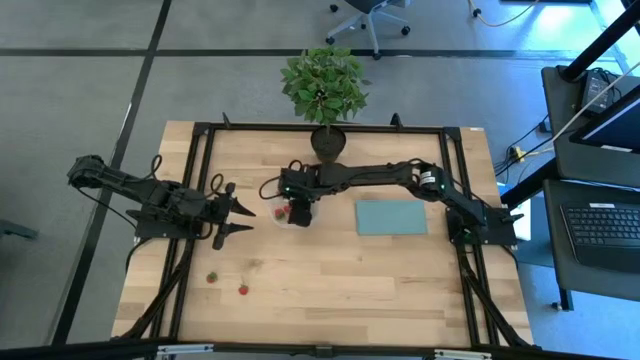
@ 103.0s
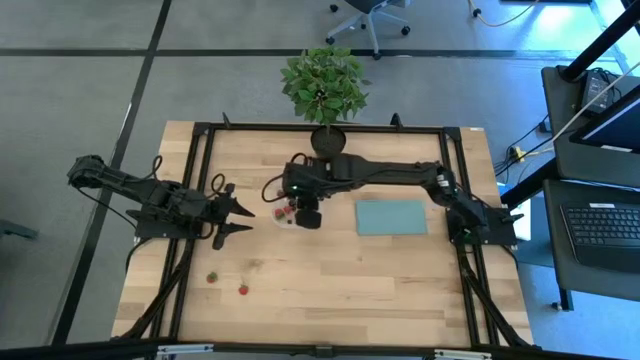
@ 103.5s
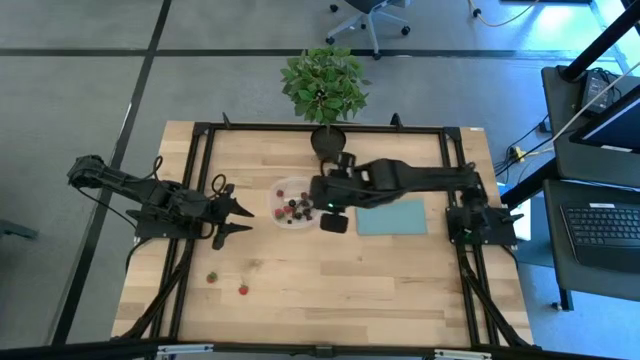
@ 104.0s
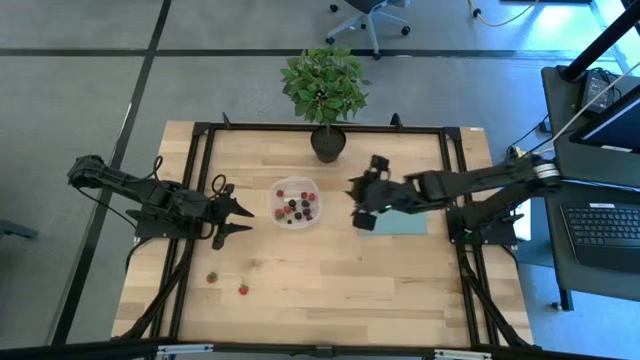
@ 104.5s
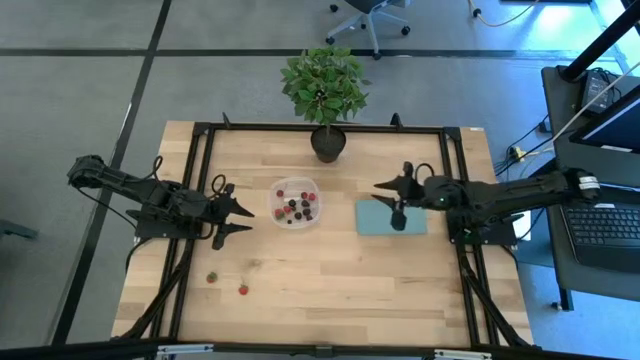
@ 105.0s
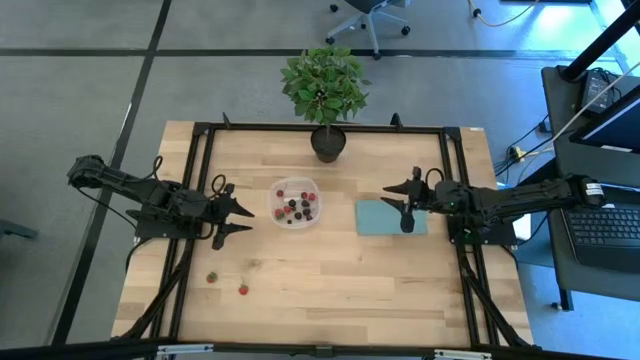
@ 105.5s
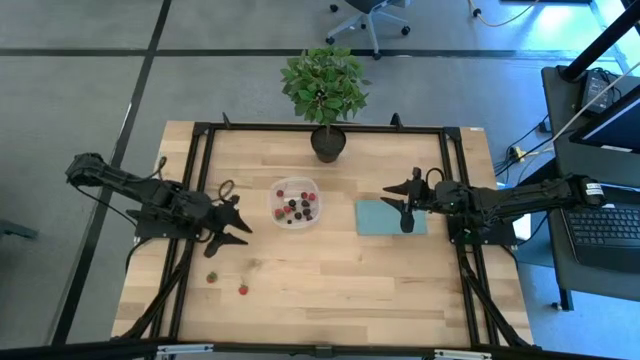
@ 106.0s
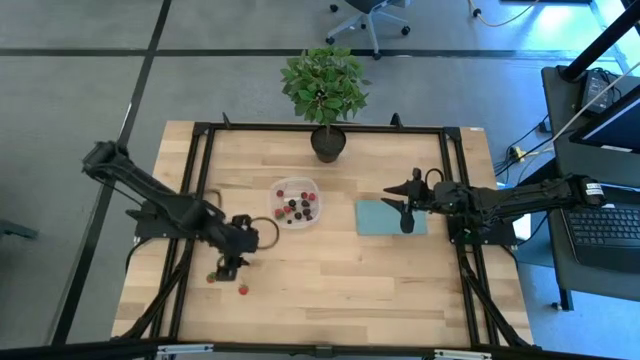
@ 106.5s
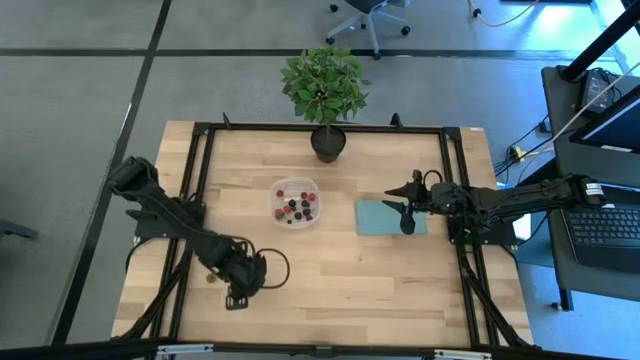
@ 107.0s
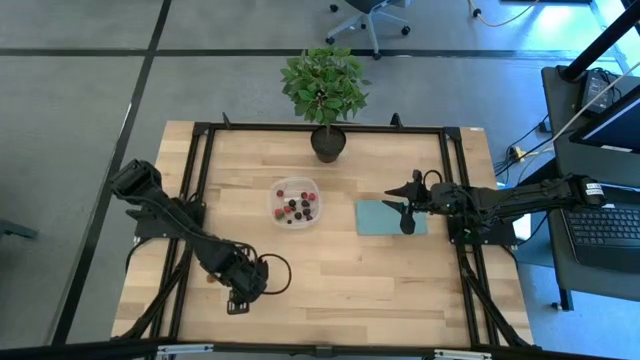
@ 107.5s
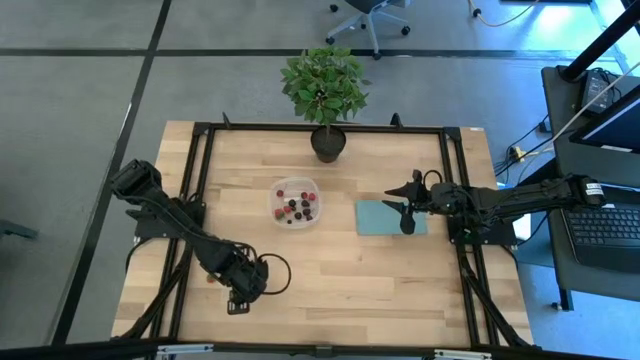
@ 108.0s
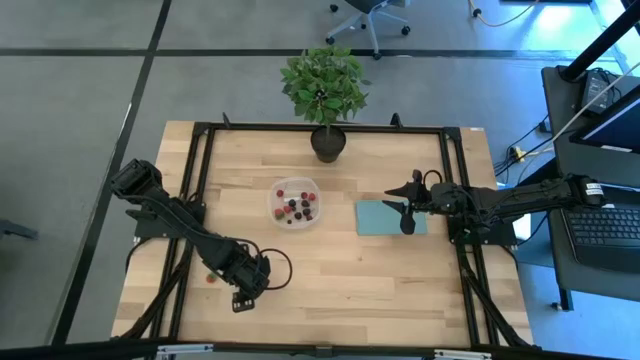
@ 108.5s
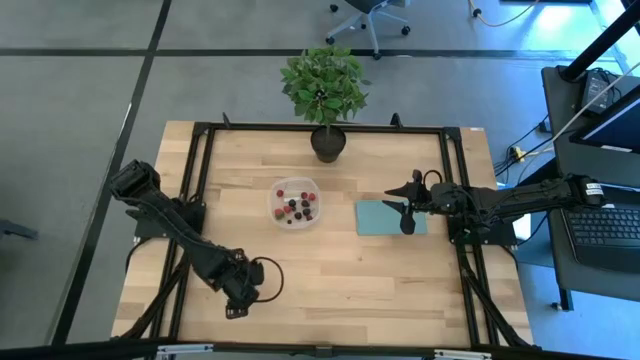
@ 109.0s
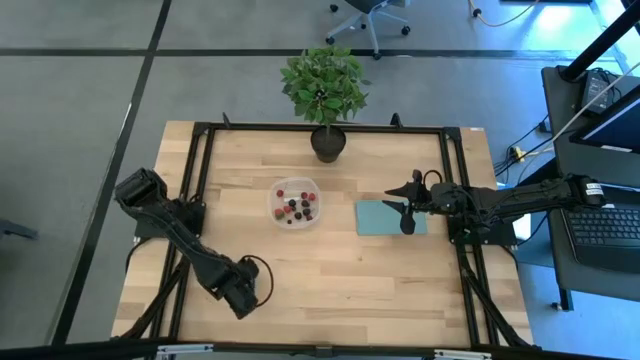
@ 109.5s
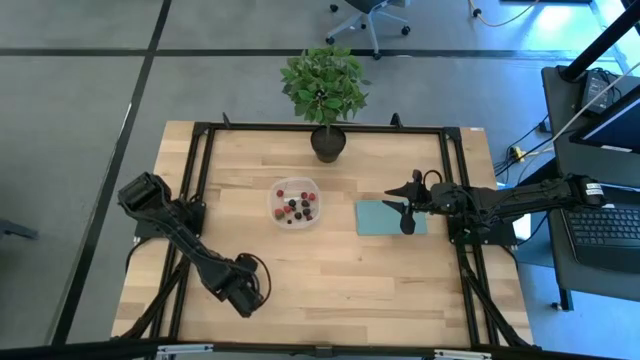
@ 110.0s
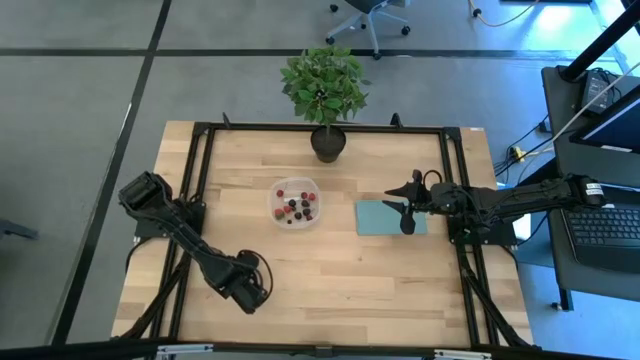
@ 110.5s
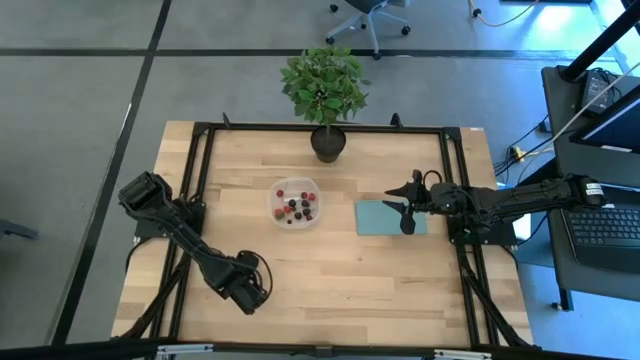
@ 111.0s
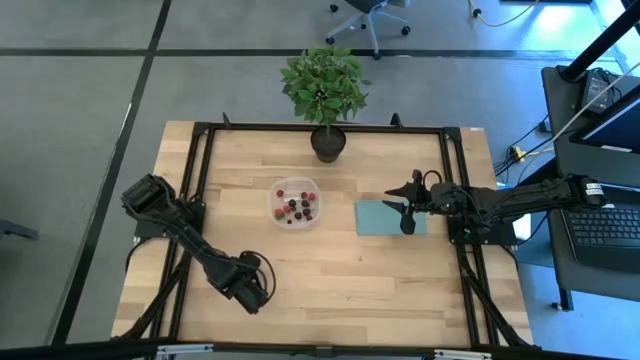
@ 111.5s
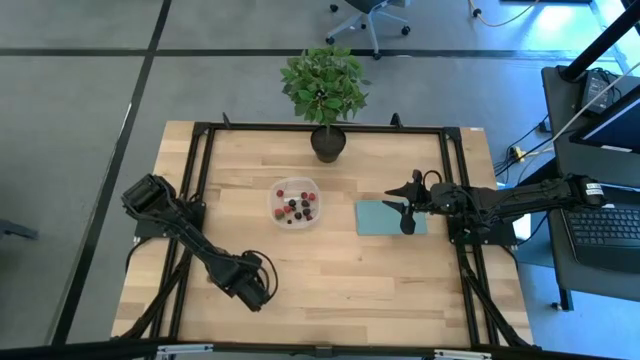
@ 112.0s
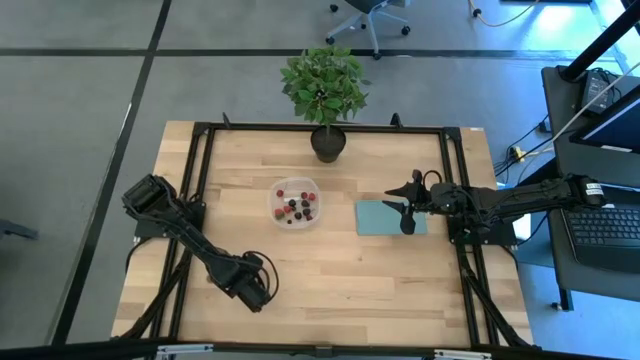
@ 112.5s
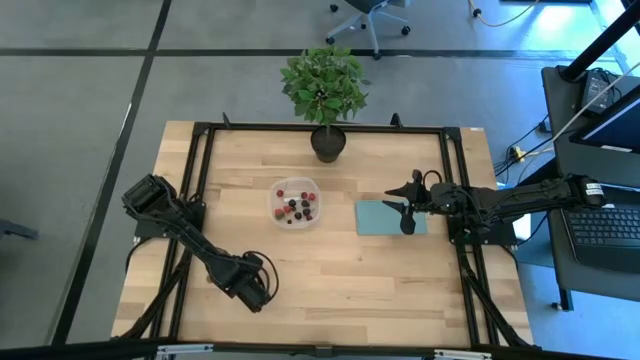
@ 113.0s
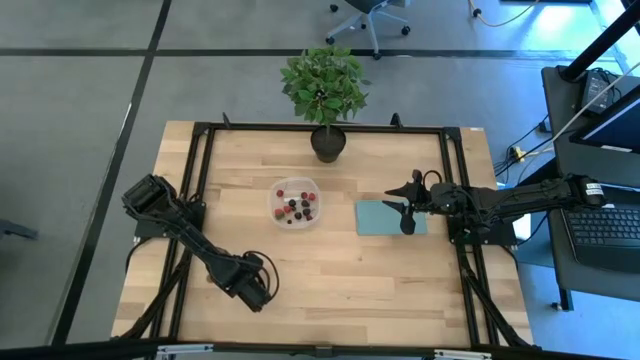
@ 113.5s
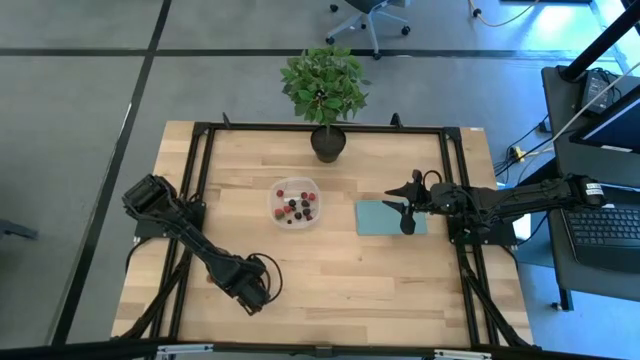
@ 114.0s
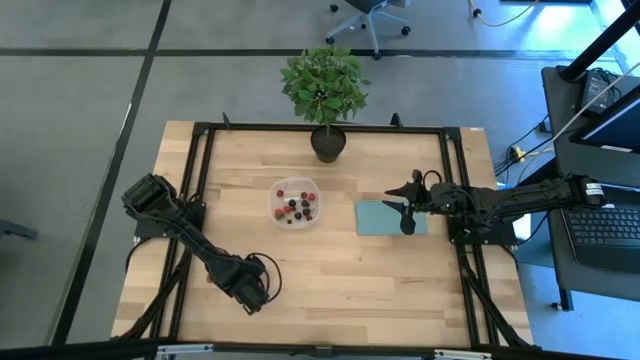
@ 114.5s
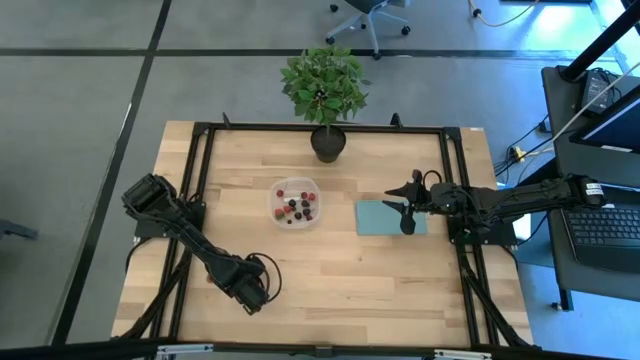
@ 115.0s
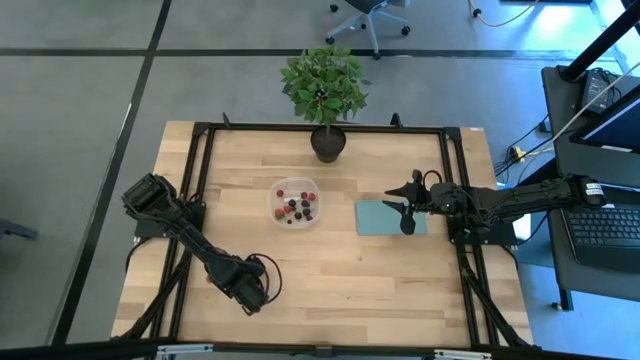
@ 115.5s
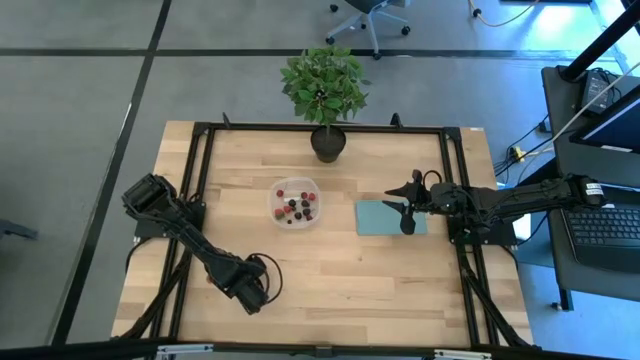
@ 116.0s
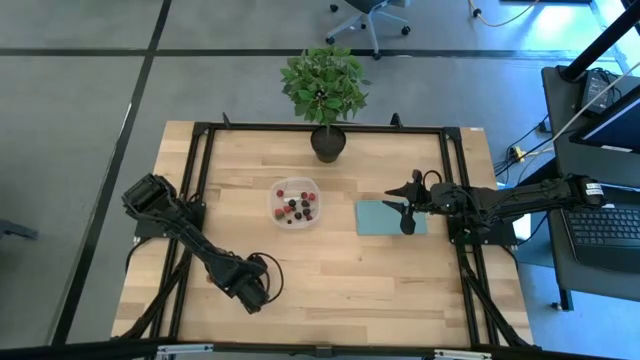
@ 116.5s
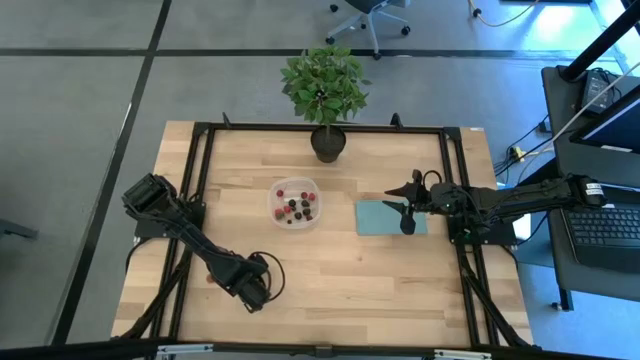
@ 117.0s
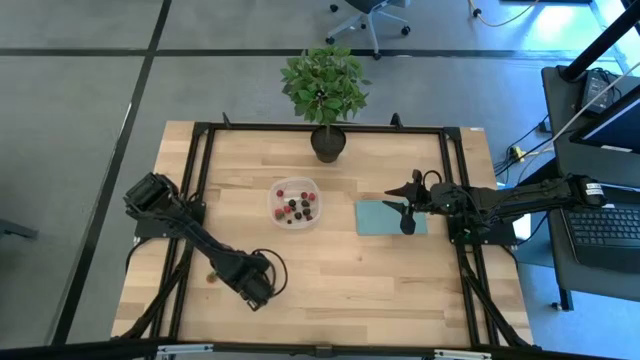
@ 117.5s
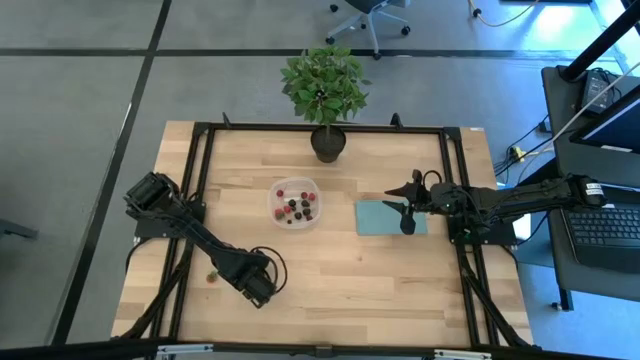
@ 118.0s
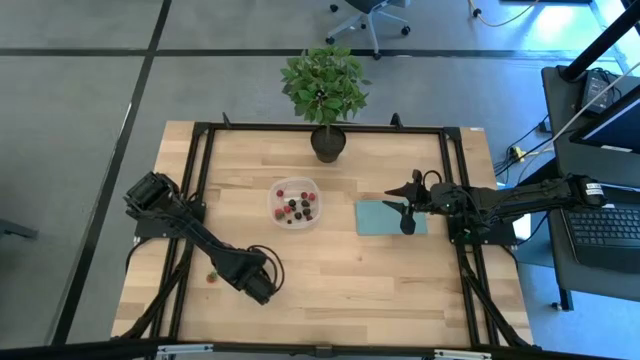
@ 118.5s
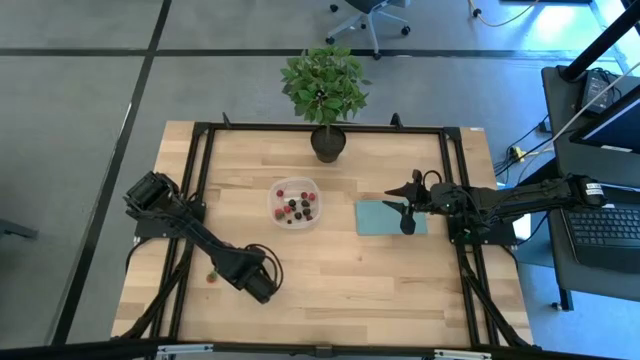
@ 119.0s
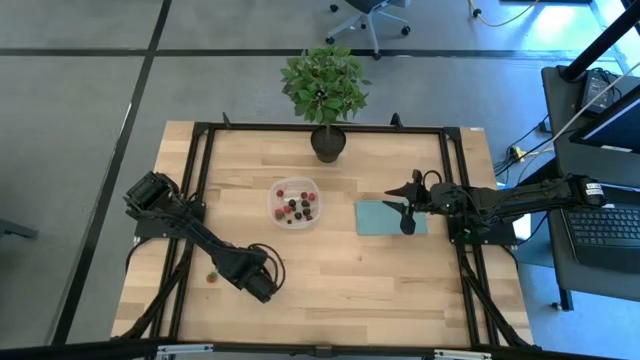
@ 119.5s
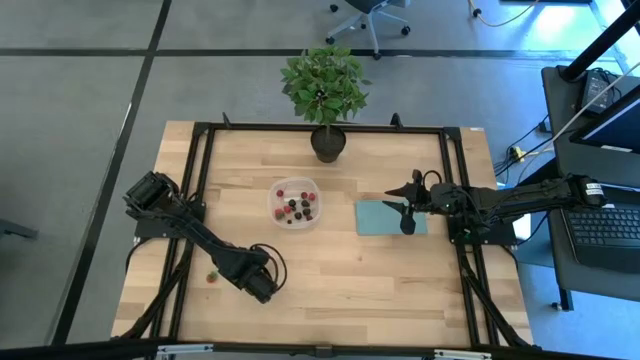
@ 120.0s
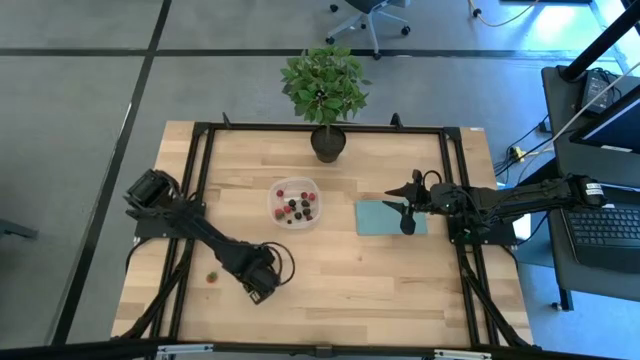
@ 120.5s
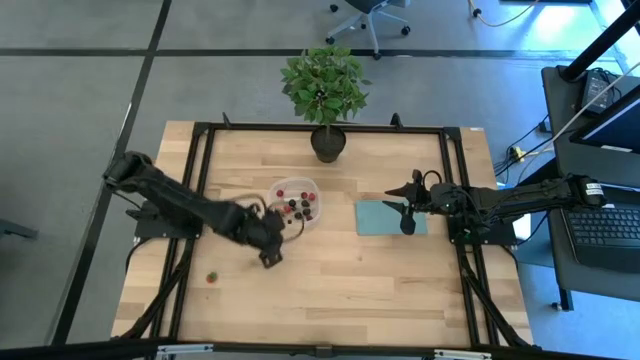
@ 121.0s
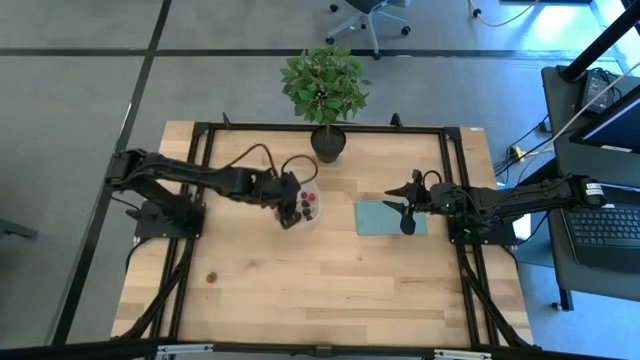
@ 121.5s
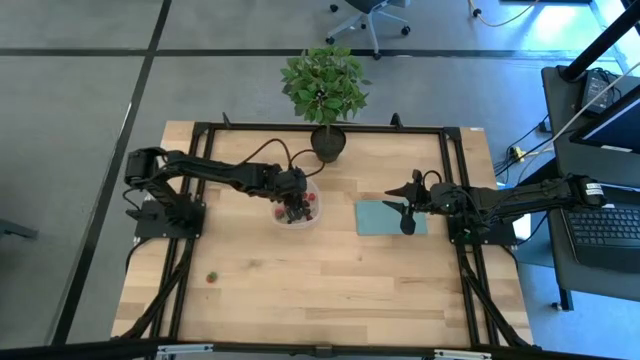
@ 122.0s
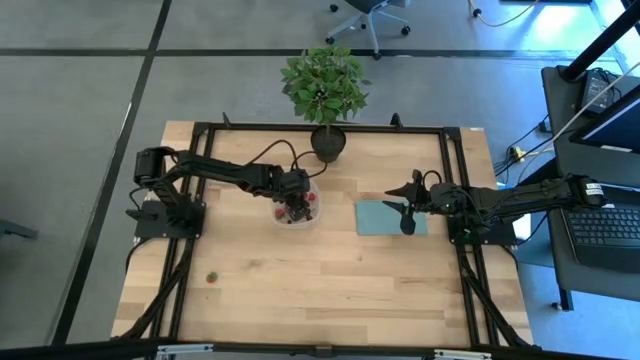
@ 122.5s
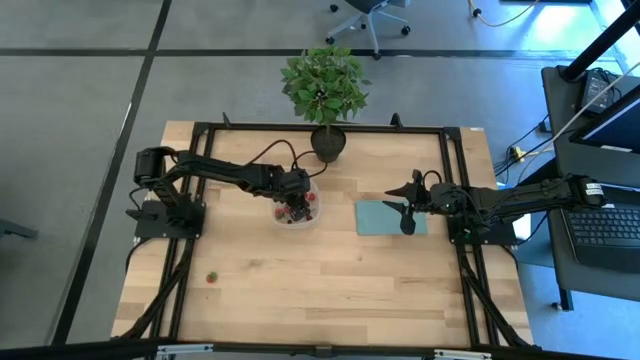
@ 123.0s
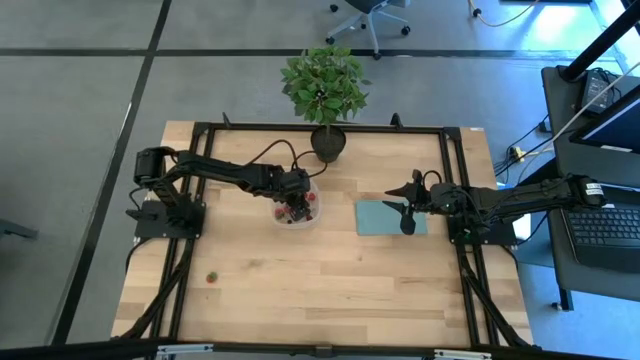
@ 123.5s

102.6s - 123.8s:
Task: Pick and placing Produce into tupperware
Put the right strawberry into the container

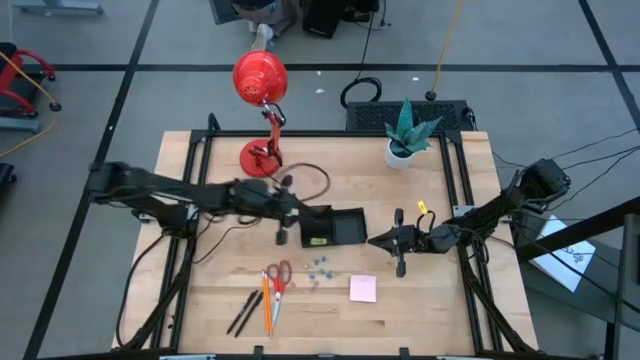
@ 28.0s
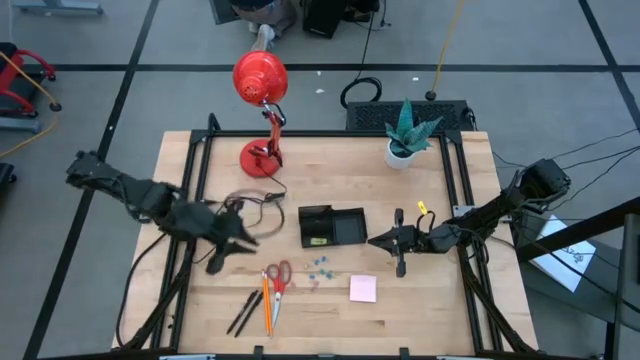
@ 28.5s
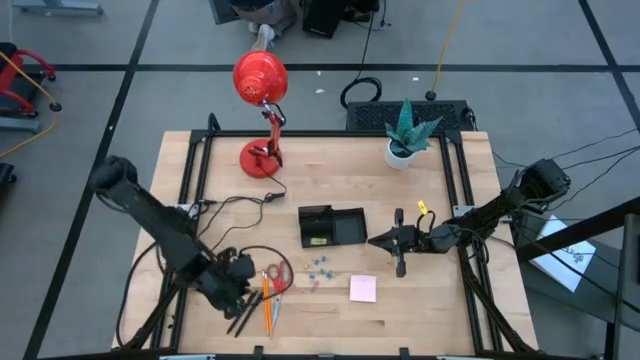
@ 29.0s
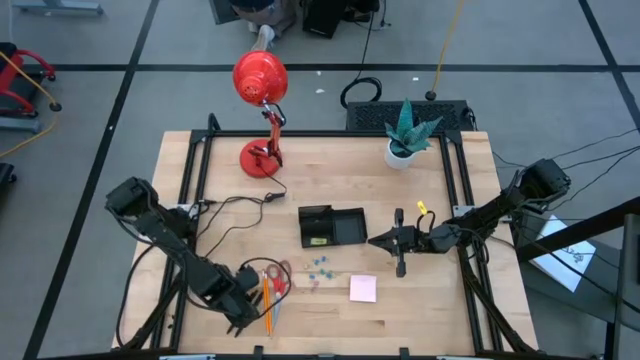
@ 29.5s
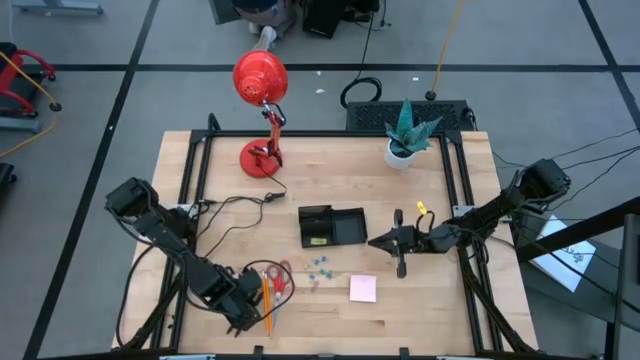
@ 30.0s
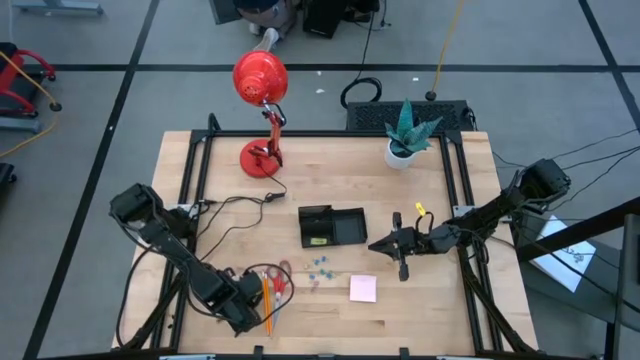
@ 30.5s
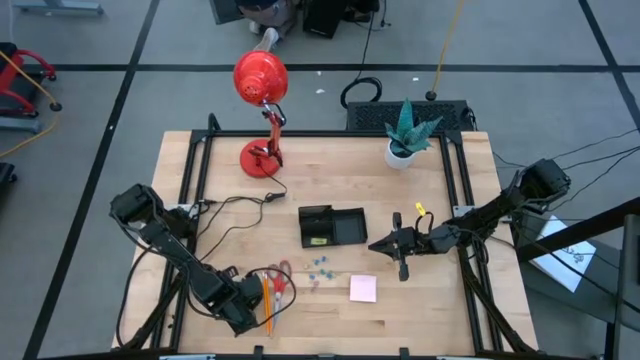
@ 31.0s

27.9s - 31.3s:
Task: Pick and place office supplies into organizer
Put the black pen into the desk organizer
